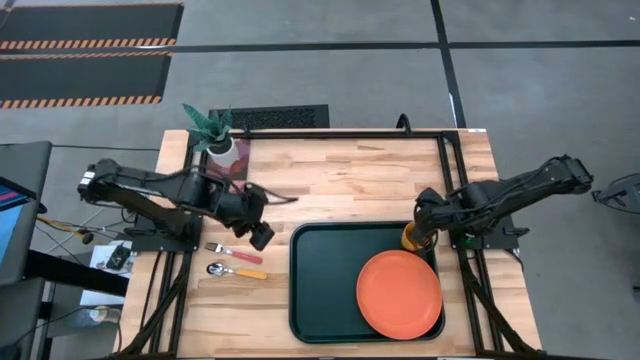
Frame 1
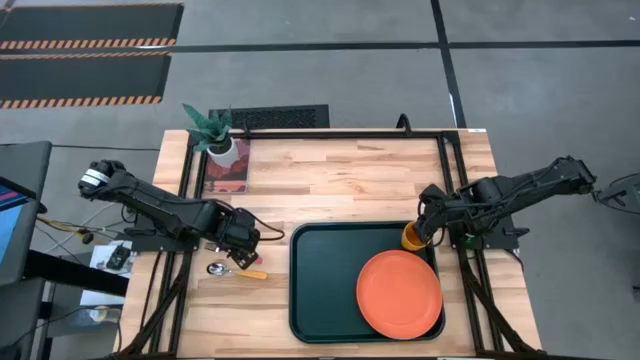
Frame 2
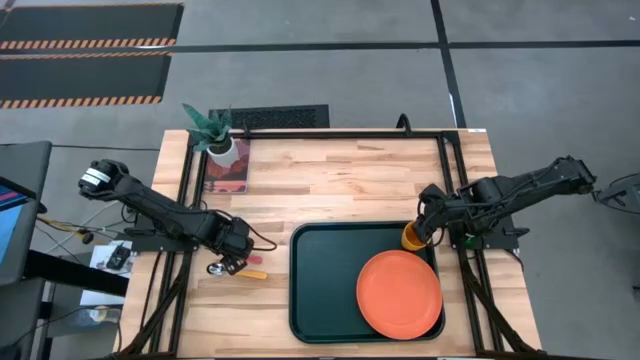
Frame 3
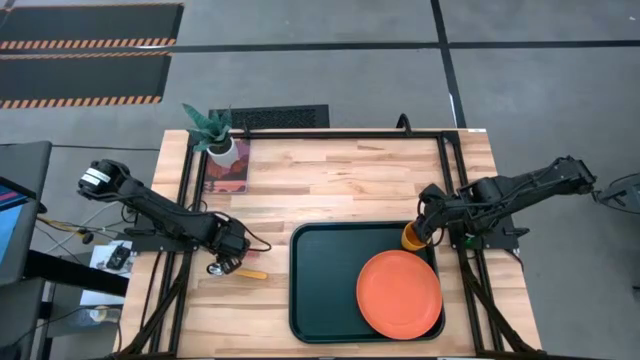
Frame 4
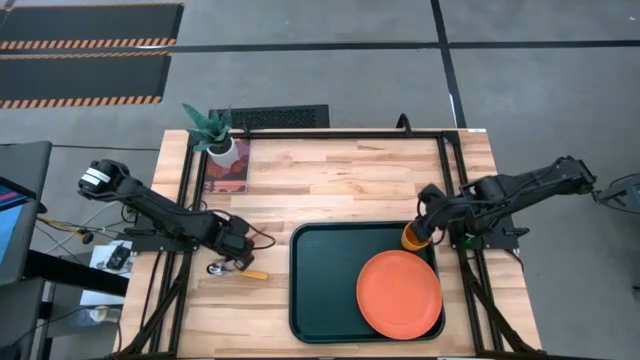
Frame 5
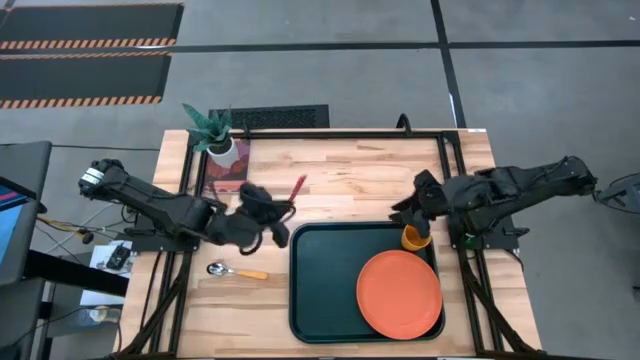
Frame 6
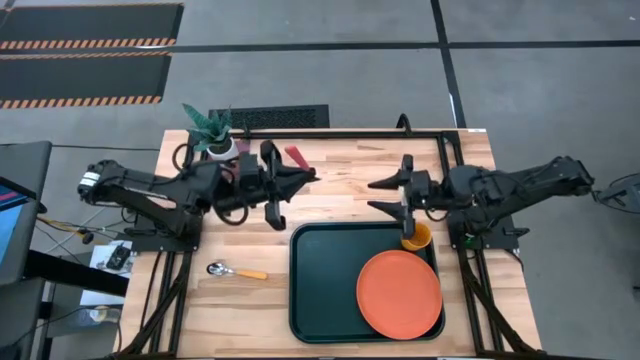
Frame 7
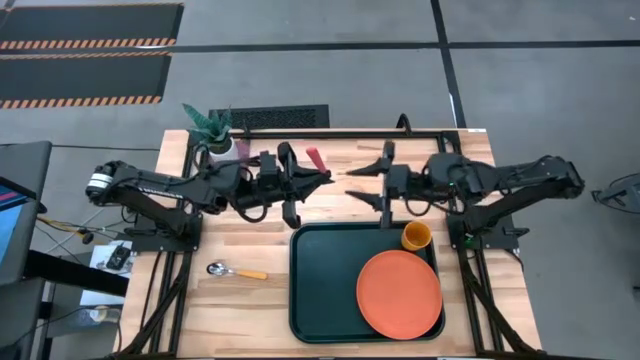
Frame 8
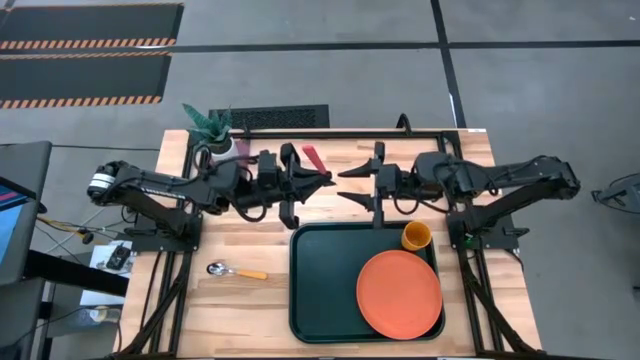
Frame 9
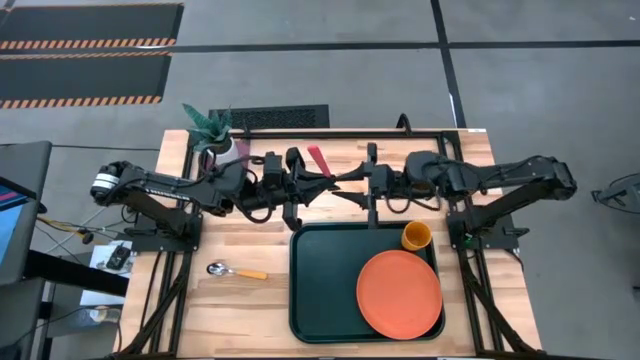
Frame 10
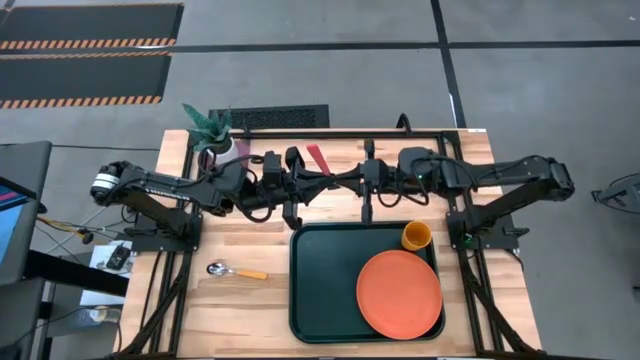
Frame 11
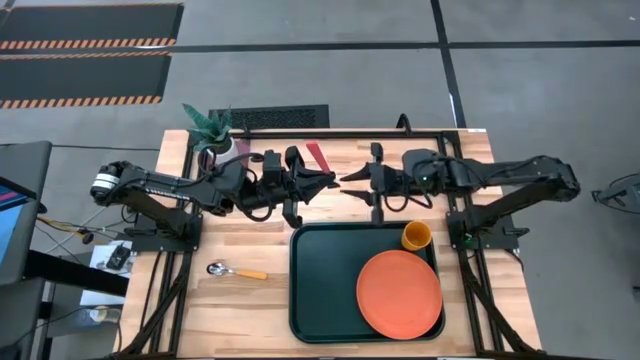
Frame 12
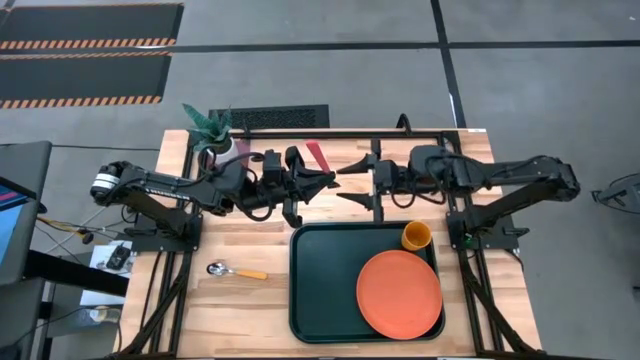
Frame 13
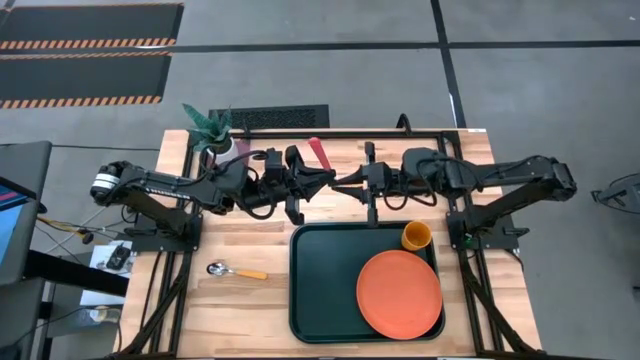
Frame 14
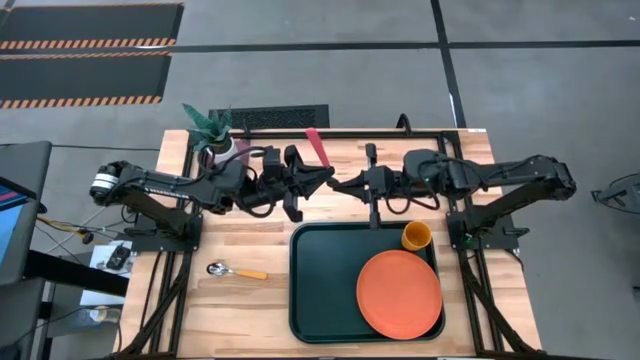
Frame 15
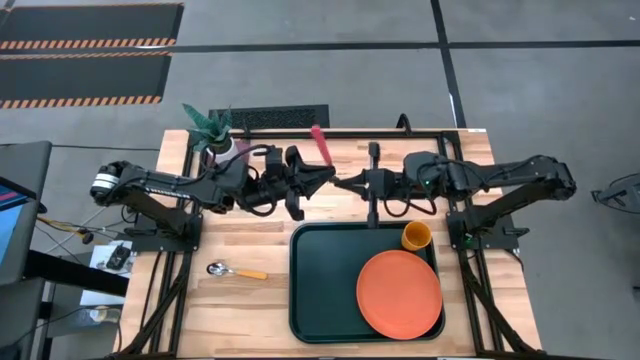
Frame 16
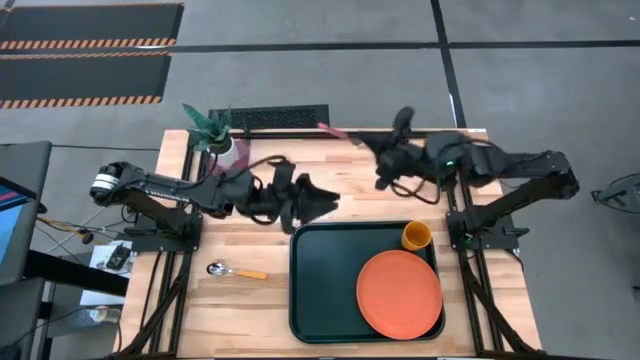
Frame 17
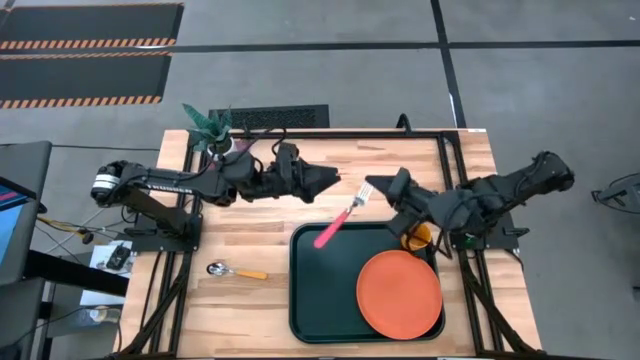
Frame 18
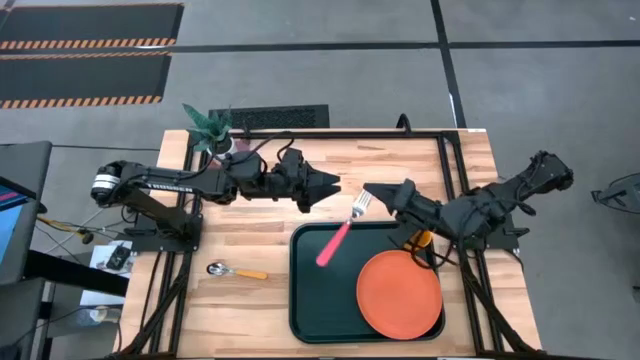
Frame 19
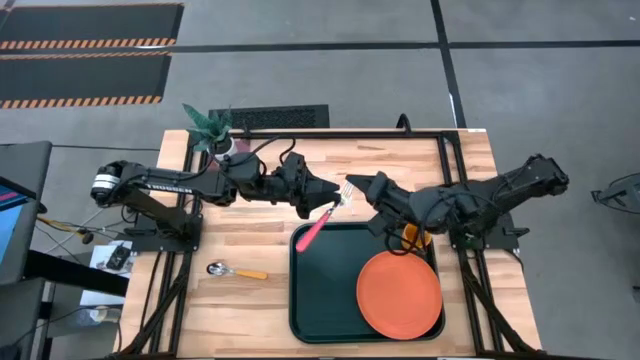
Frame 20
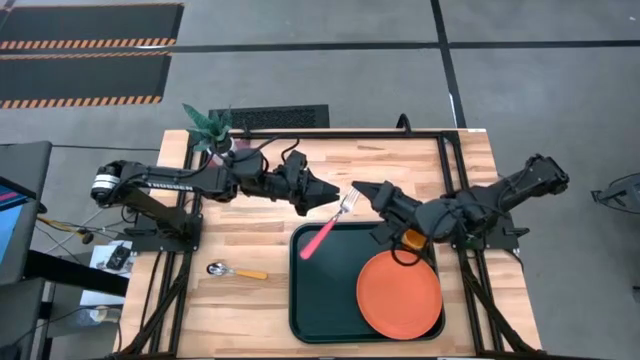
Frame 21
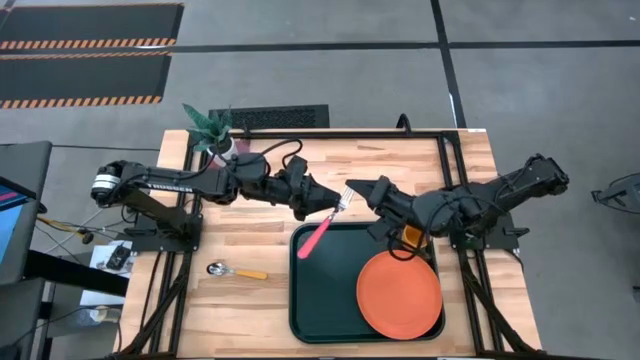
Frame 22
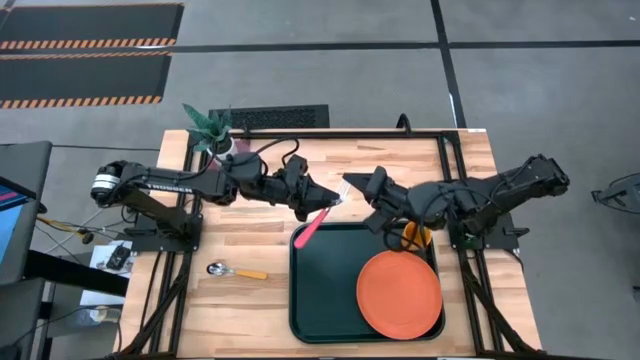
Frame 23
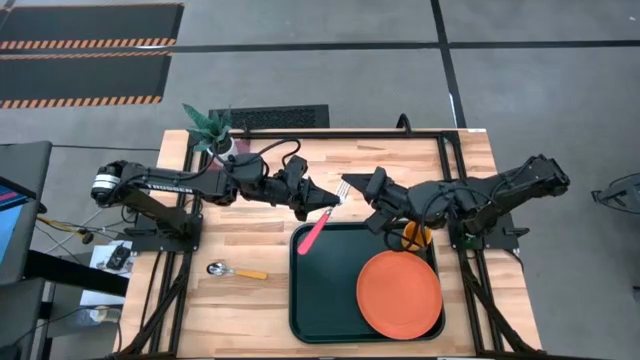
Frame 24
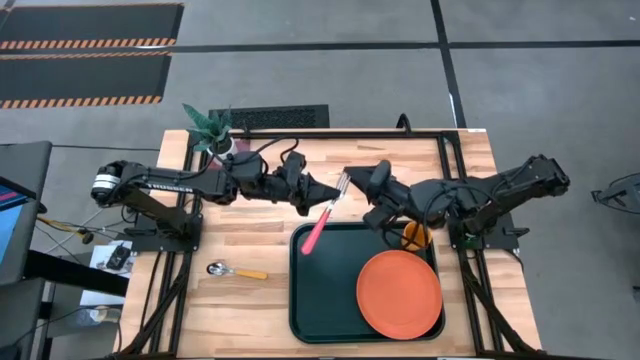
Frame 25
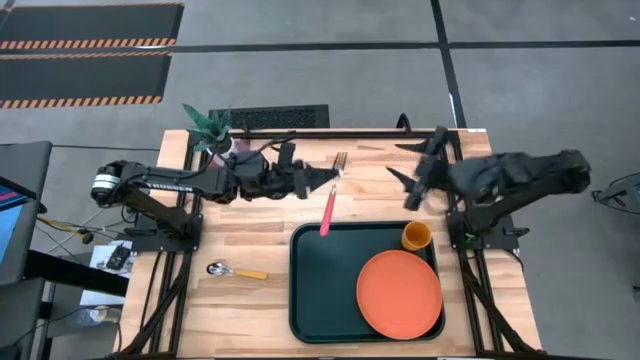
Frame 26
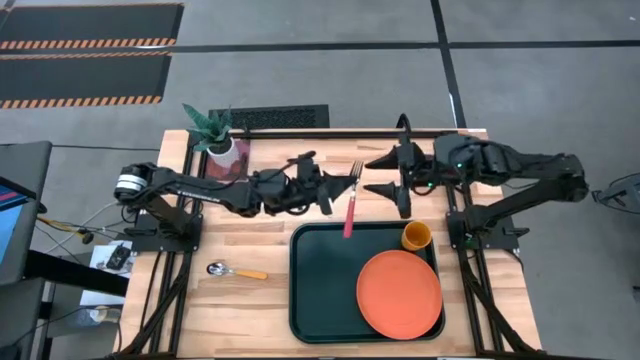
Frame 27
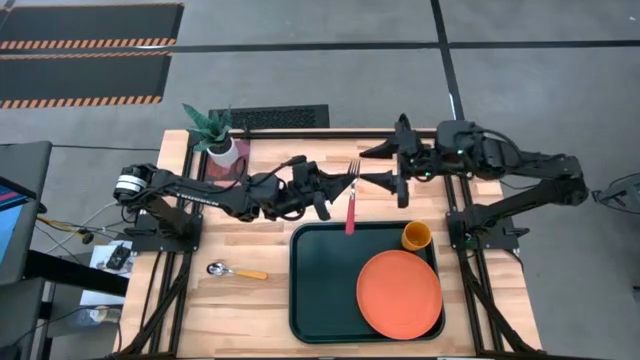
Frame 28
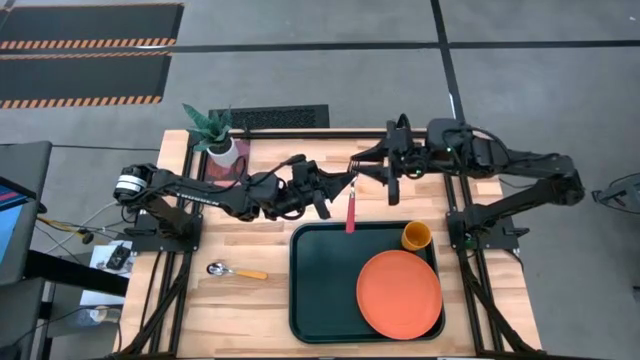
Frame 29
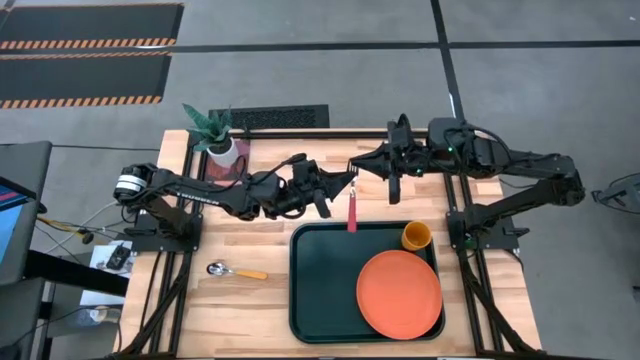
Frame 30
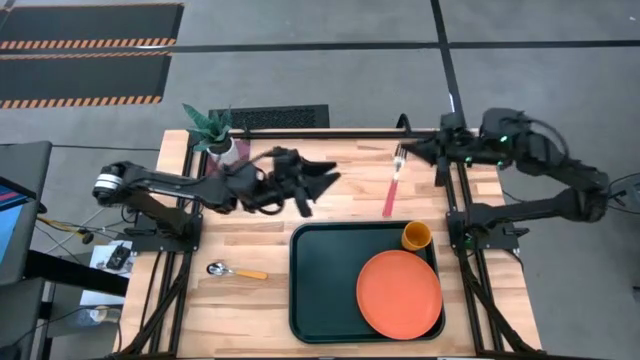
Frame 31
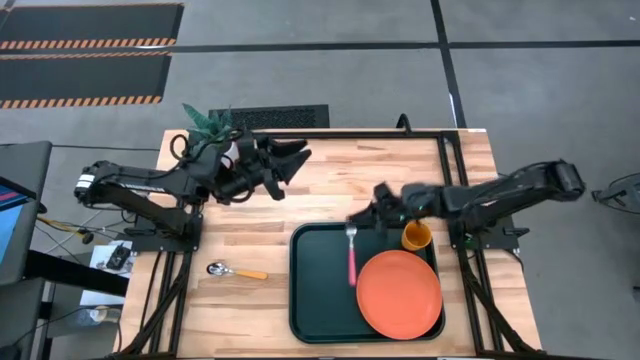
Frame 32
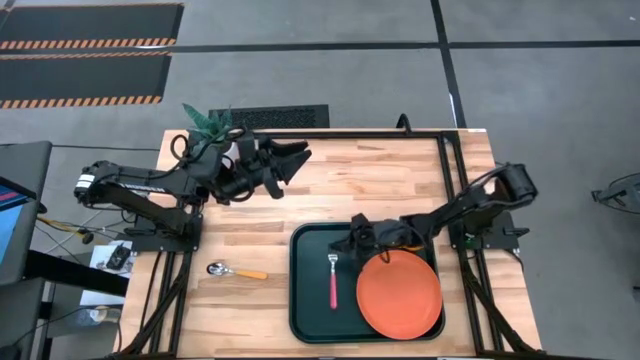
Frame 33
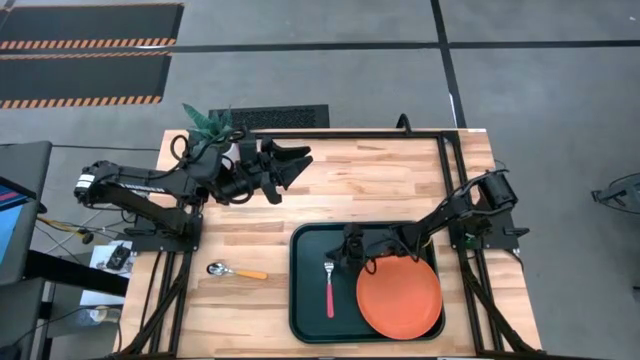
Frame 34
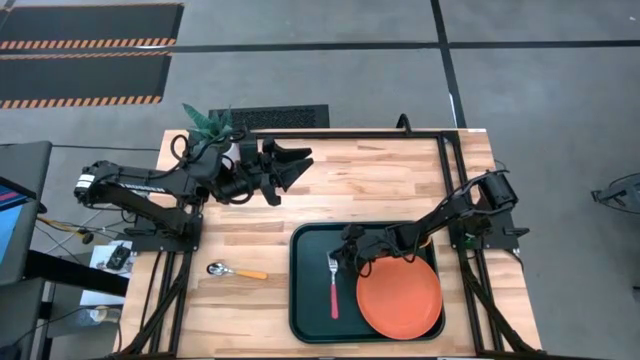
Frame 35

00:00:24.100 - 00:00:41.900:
Task: Pick and place plate/cup/fork/spoon on tray
Put the pink fork next to the orange plate on the black tray

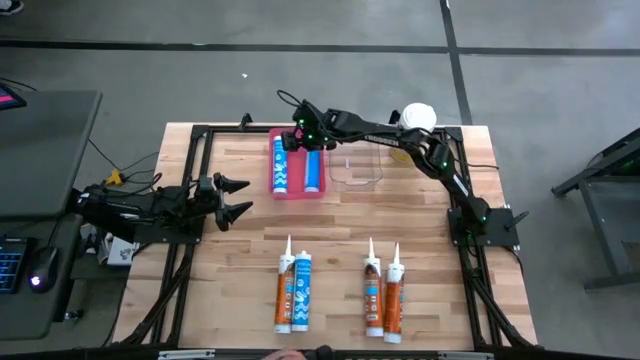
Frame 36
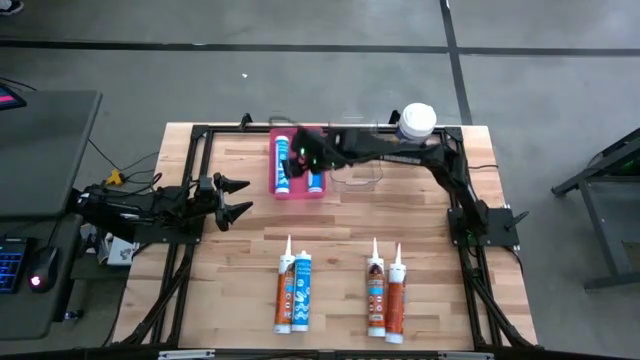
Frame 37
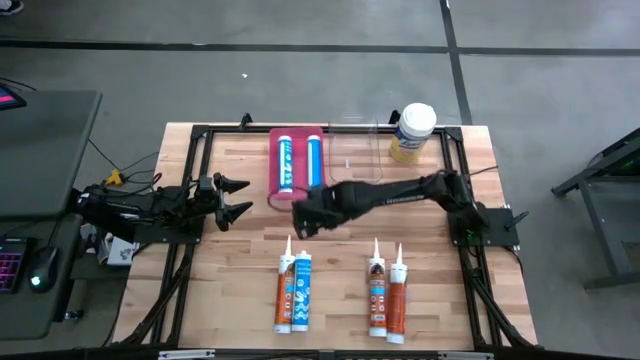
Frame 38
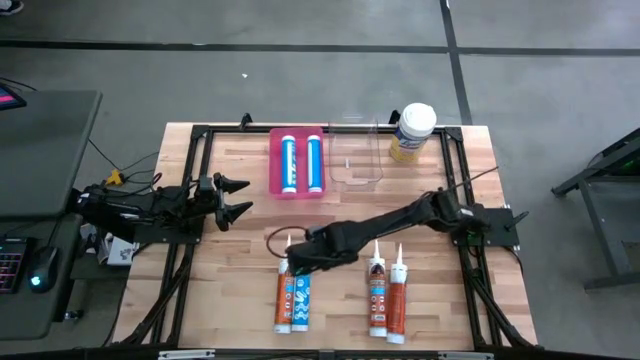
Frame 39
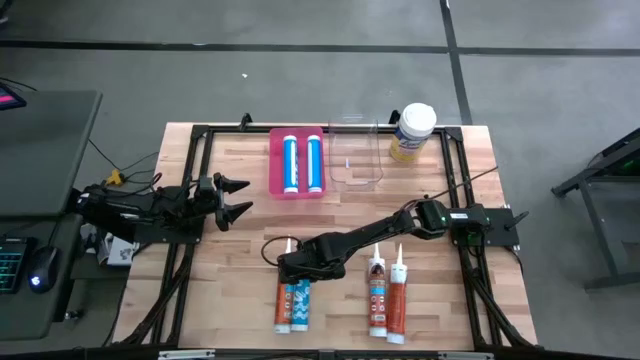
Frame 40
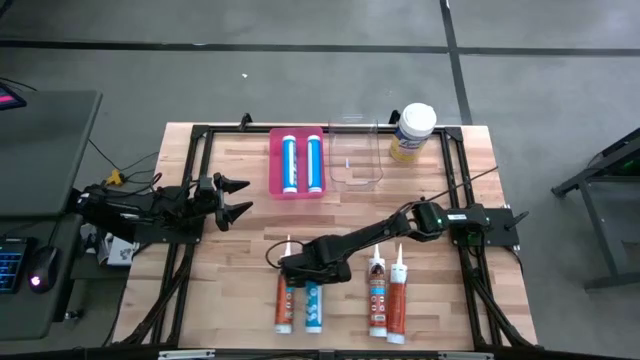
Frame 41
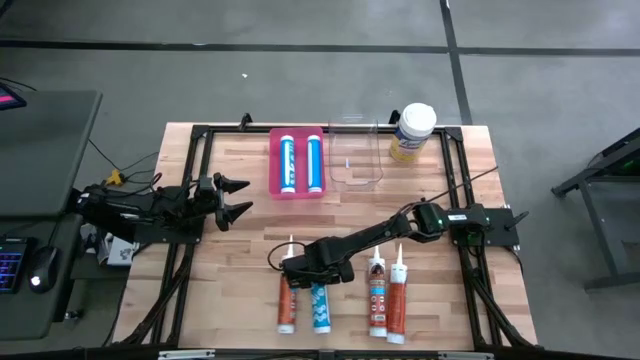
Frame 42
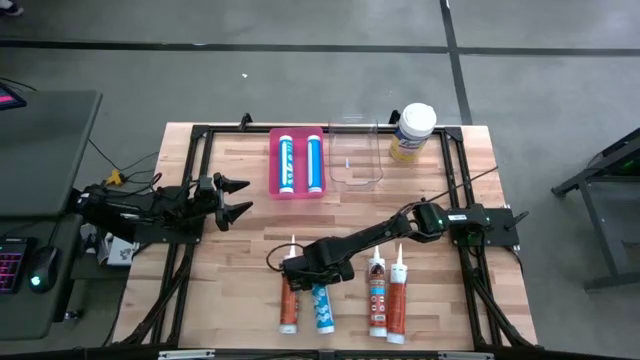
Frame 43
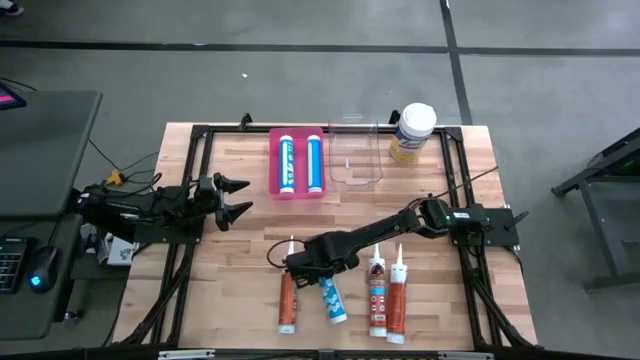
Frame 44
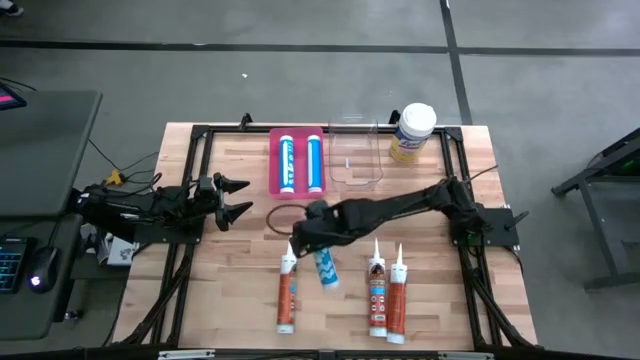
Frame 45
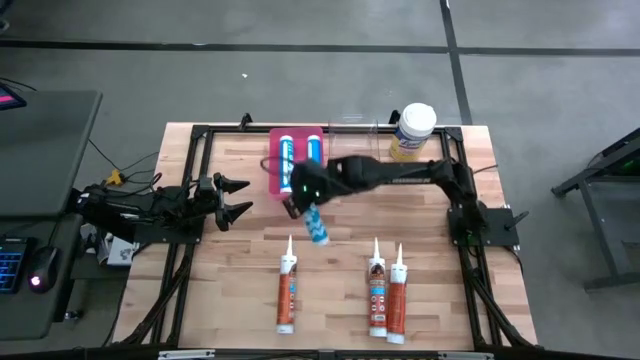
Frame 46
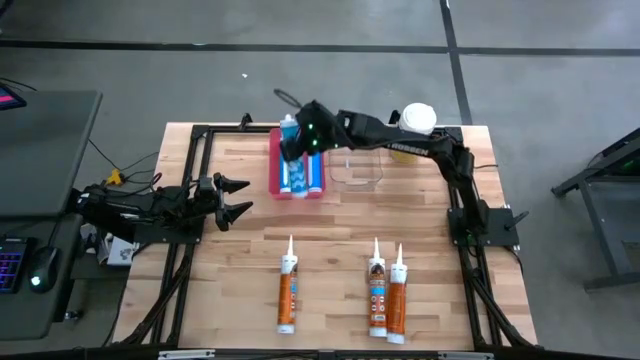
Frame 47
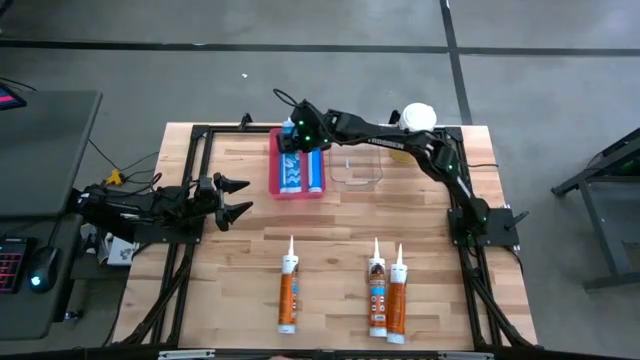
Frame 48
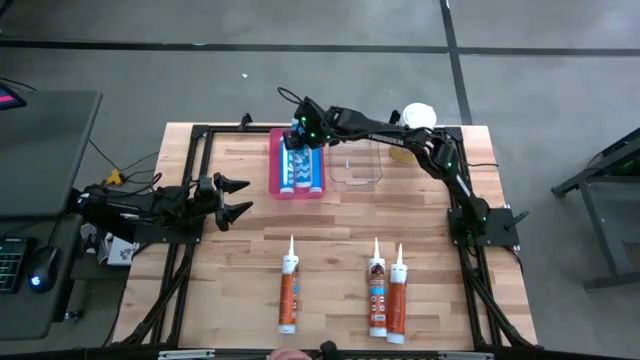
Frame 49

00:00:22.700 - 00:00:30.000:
Task: Pick & place silicon tubes, Sealant and Lysol wipes
Put the blue sealant into the red bin
